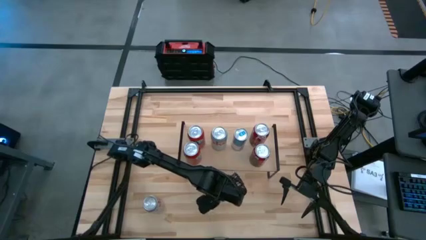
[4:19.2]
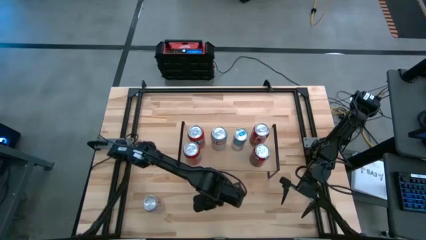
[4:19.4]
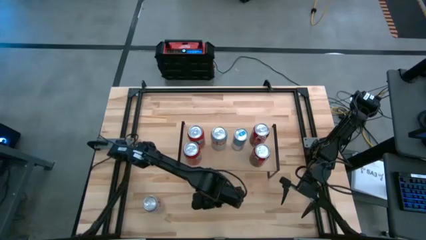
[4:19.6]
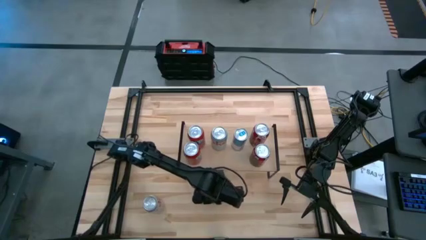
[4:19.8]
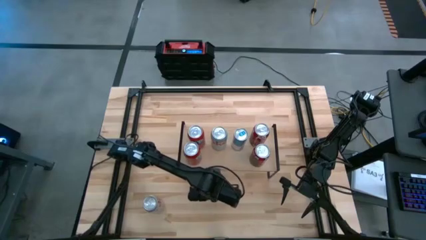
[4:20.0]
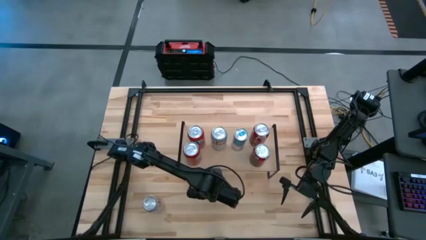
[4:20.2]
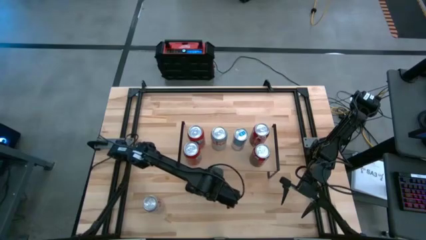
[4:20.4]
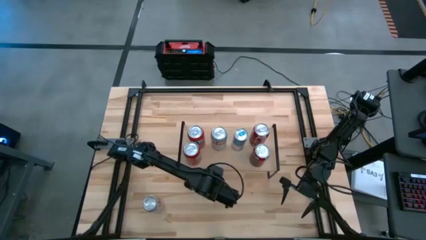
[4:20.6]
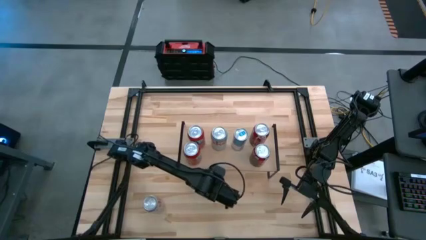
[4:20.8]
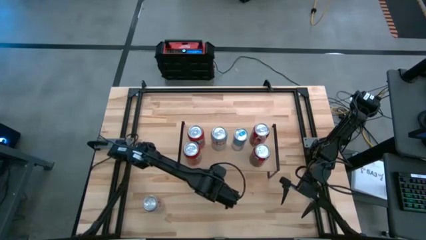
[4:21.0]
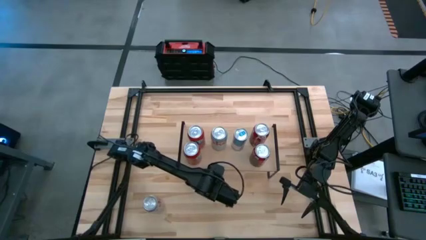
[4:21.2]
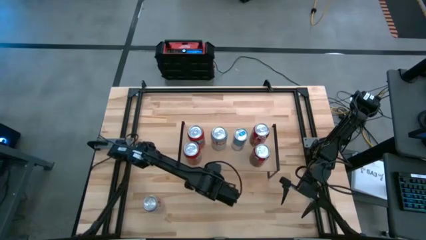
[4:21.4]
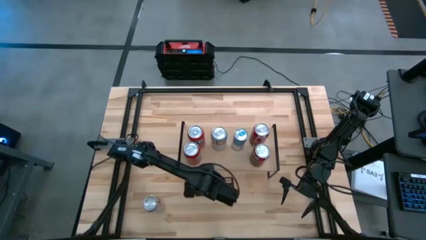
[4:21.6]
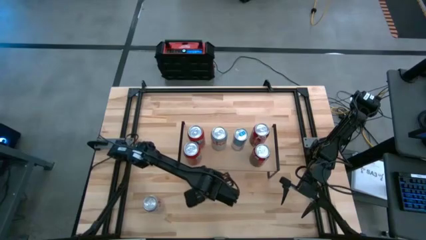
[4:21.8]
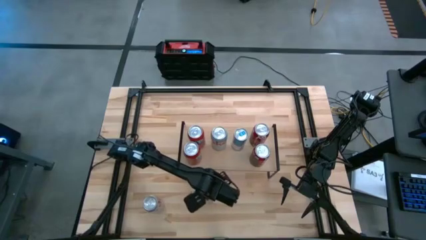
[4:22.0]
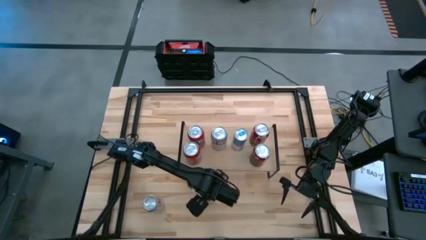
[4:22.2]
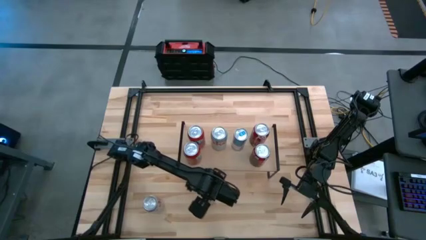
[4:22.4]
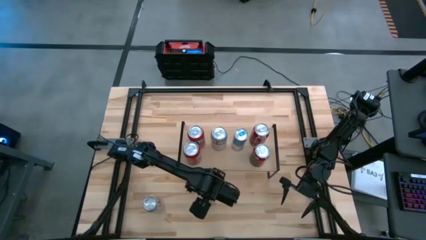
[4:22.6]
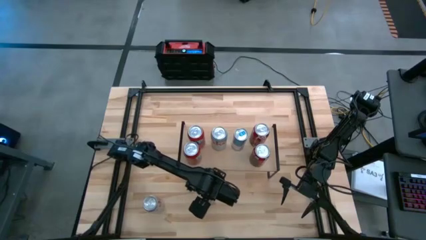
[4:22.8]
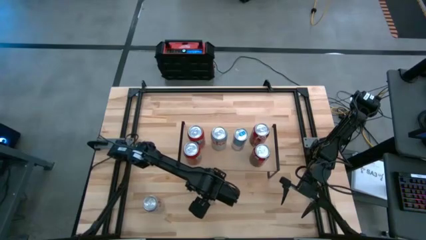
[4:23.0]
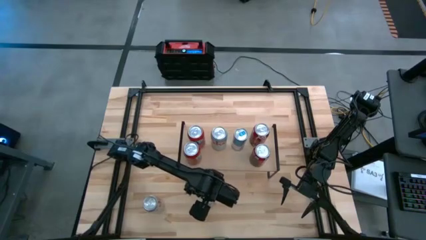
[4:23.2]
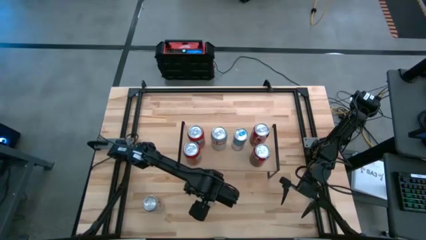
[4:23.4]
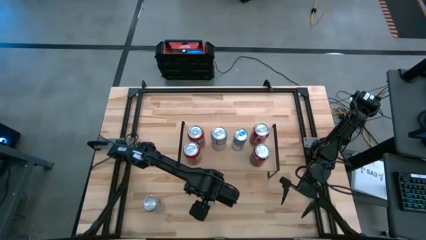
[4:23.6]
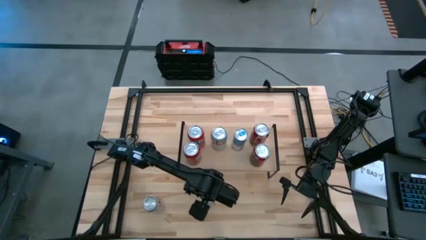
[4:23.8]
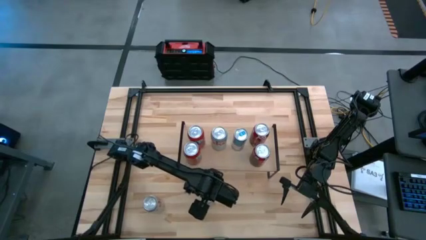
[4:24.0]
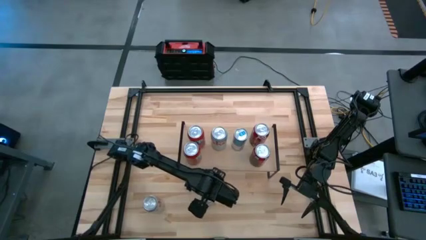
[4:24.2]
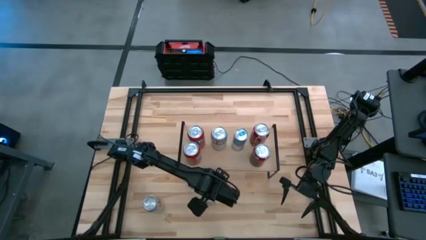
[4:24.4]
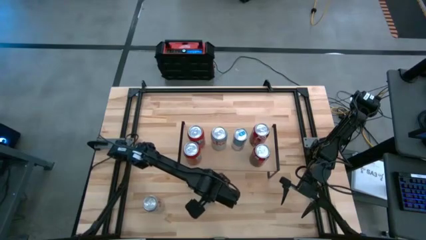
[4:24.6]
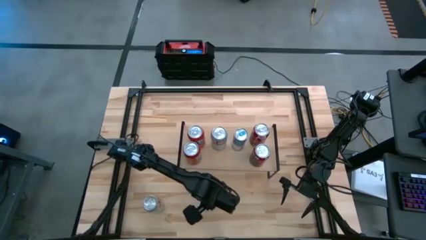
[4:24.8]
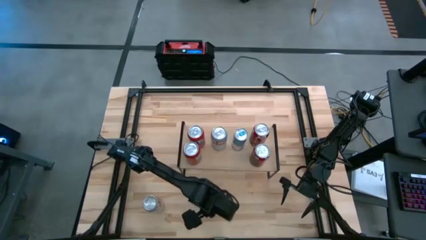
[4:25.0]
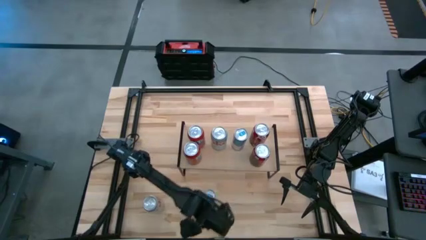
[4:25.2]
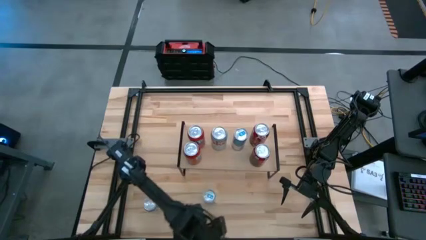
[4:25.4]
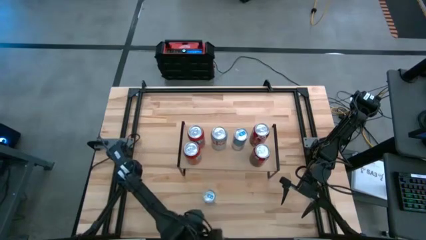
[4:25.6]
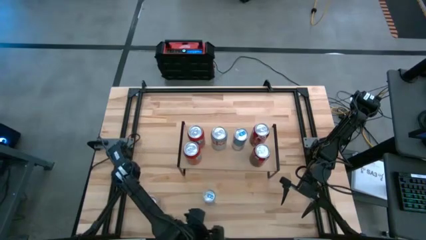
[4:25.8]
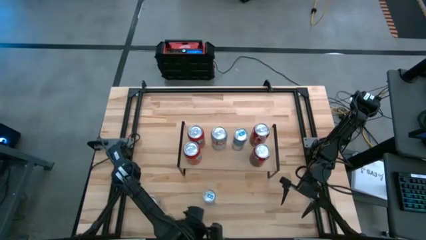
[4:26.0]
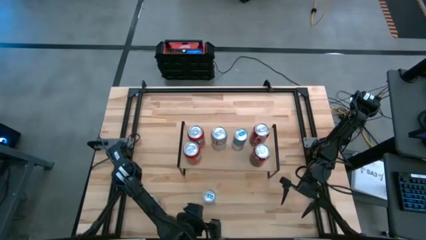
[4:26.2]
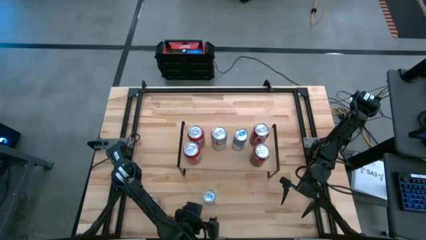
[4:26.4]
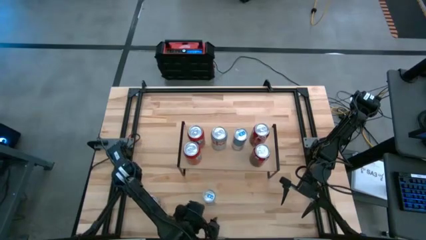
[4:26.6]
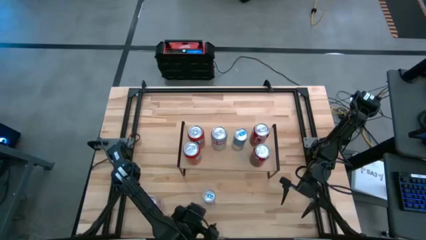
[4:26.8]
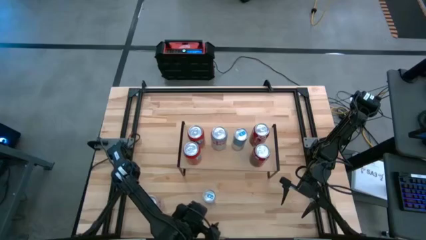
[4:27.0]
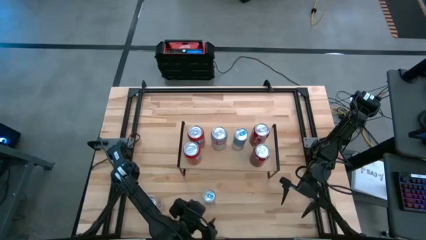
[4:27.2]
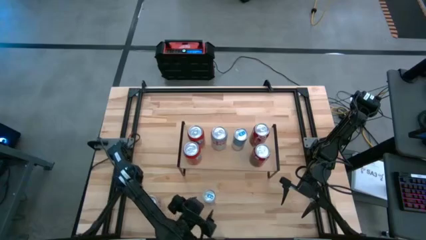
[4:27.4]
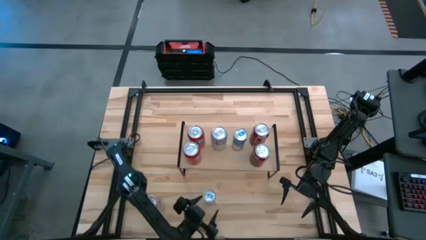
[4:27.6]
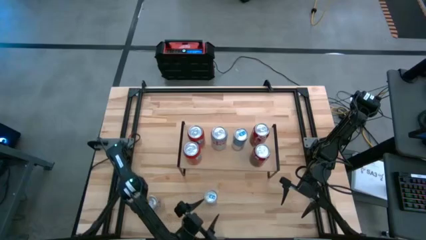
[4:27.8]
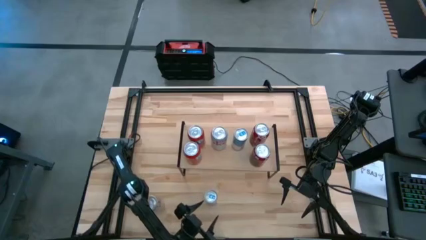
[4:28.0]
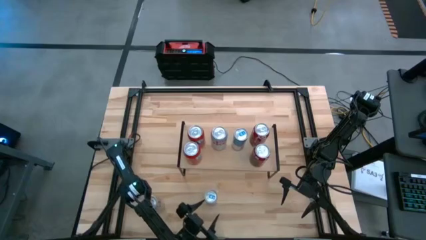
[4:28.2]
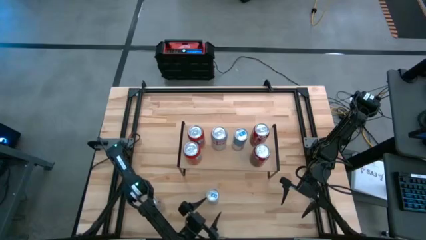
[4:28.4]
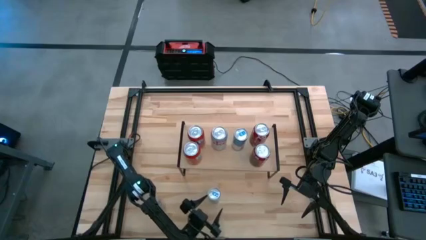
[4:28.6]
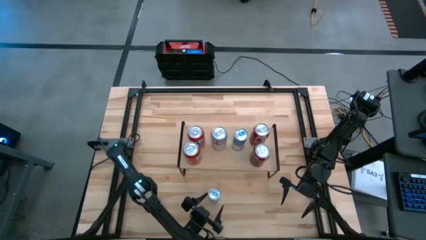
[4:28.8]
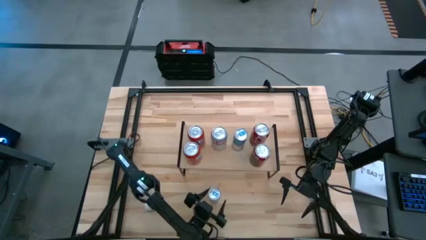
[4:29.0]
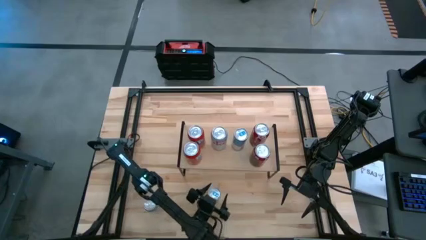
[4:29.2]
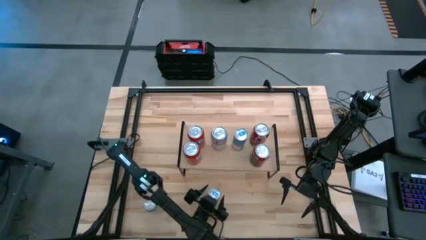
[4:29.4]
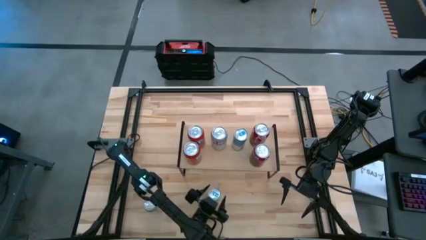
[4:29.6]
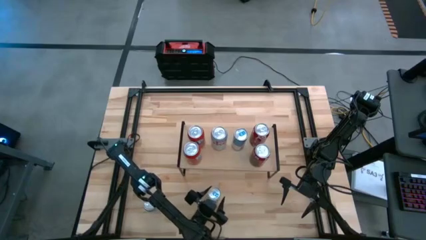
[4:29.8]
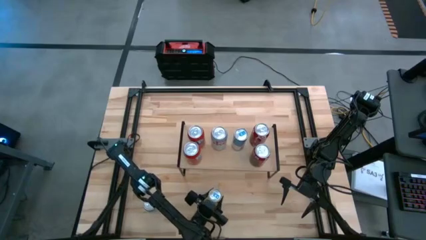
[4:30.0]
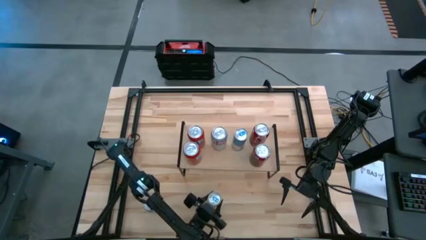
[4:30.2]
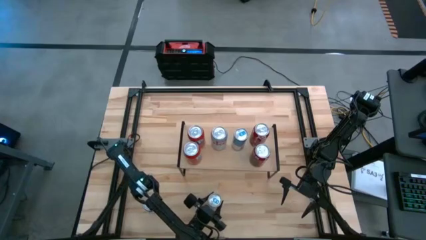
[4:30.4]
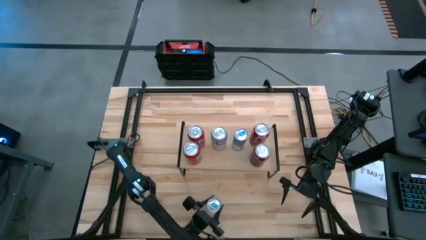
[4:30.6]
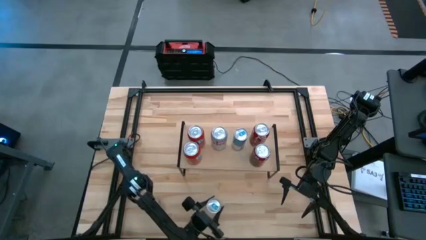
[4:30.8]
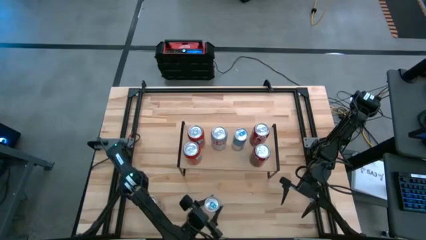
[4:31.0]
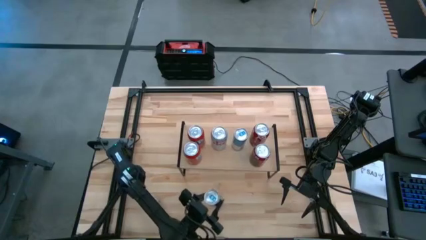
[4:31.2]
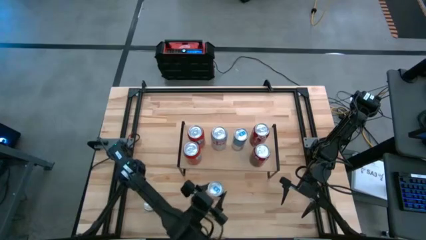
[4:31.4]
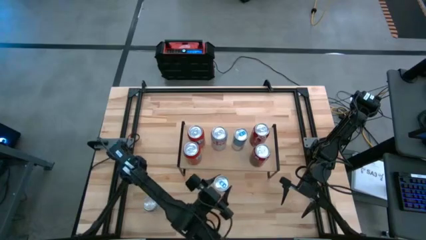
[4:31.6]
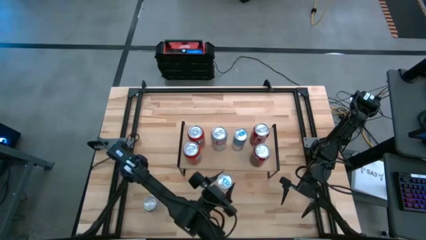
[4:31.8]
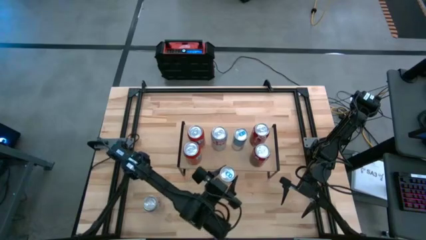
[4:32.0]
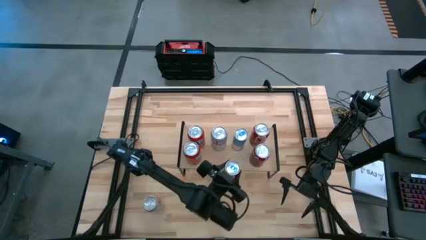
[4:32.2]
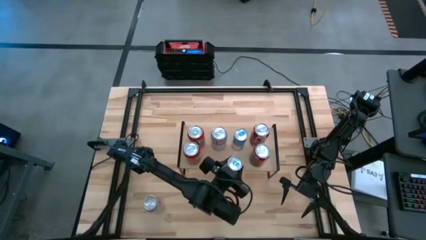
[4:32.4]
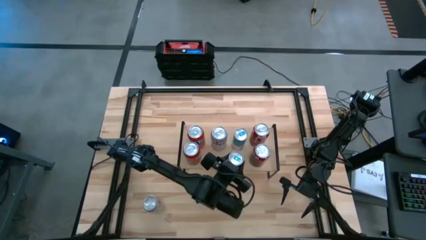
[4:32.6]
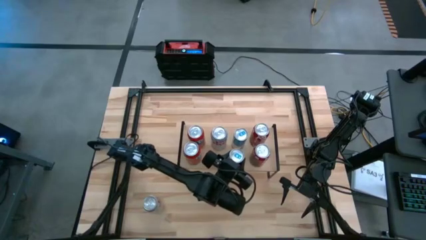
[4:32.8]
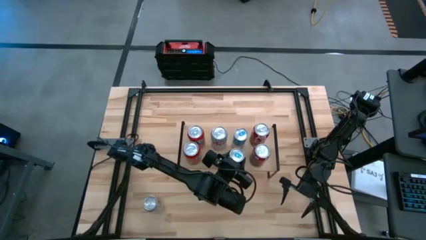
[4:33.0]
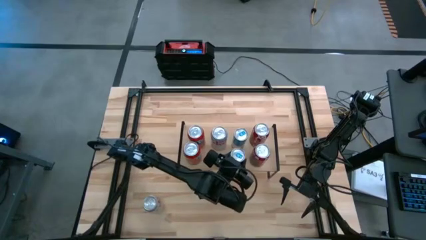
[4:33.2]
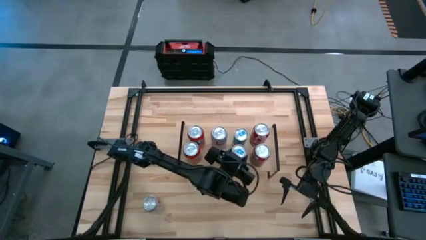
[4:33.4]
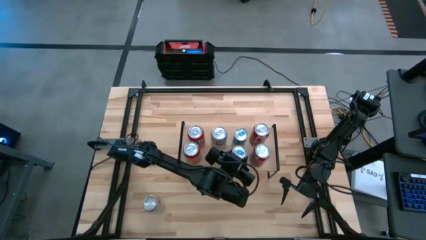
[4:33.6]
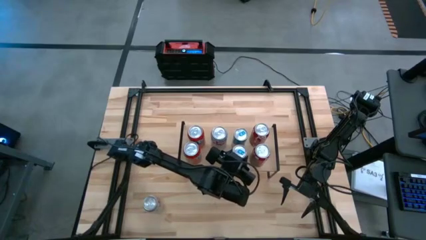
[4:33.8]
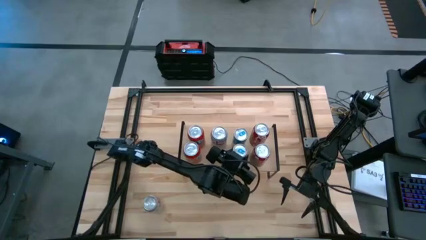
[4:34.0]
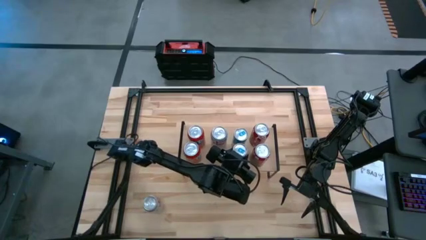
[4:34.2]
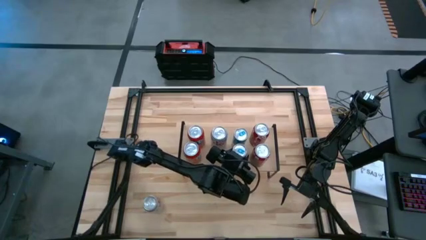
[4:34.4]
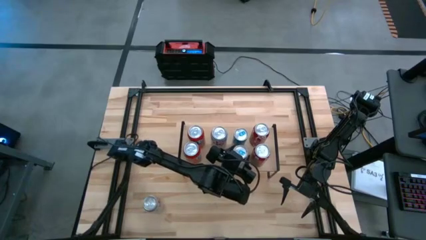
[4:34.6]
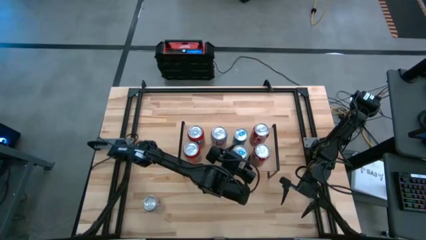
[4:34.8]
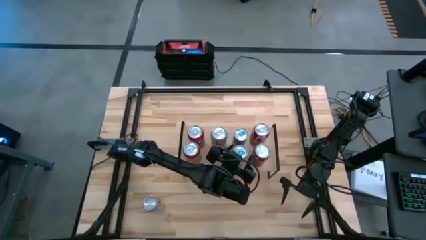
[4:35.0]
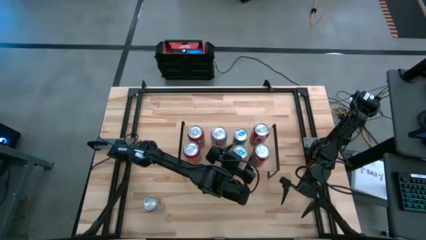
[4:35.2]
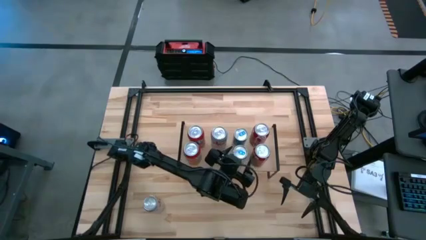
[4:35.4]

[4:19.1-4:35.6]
Task: Place canned beverage on shelf
Put the blue soda can on the shelf
